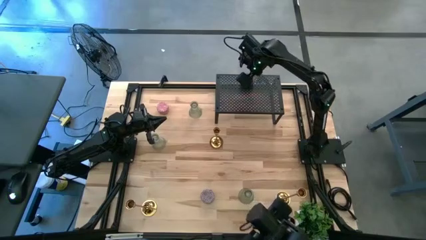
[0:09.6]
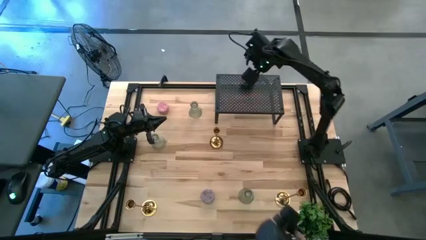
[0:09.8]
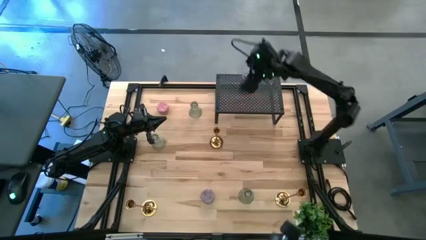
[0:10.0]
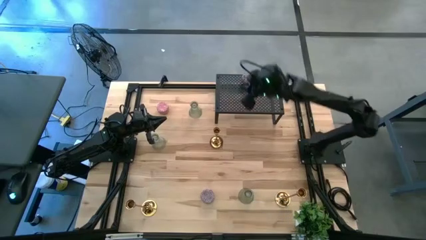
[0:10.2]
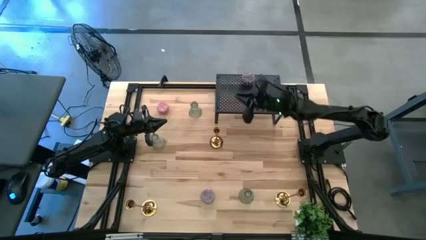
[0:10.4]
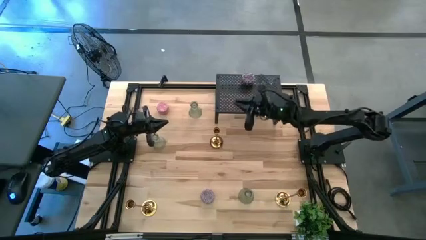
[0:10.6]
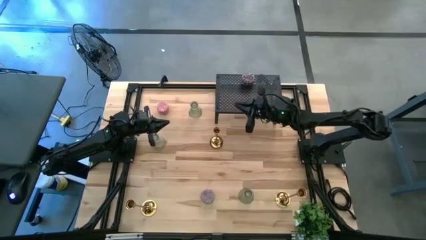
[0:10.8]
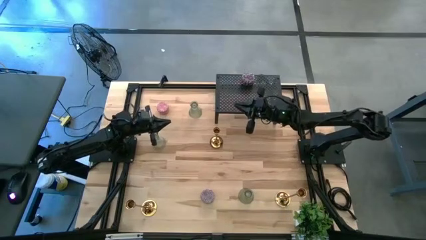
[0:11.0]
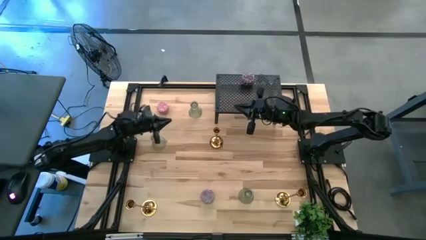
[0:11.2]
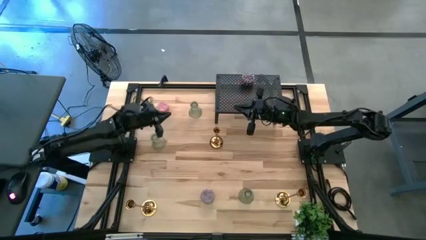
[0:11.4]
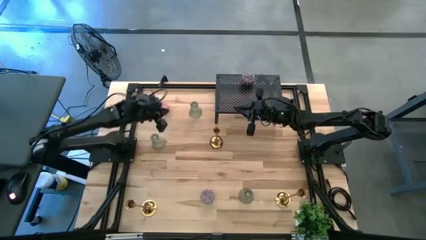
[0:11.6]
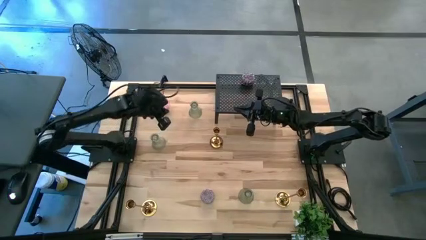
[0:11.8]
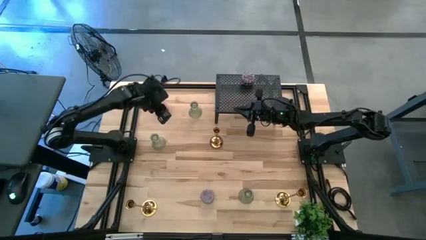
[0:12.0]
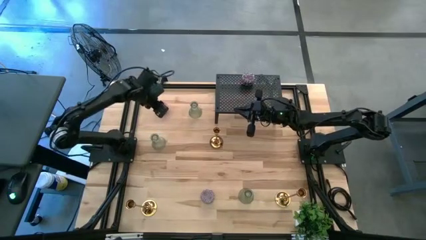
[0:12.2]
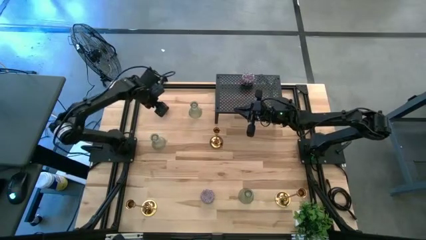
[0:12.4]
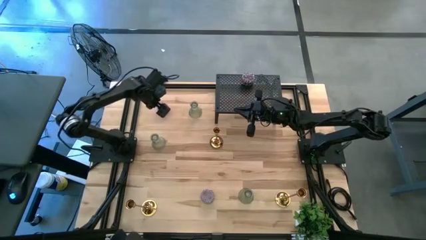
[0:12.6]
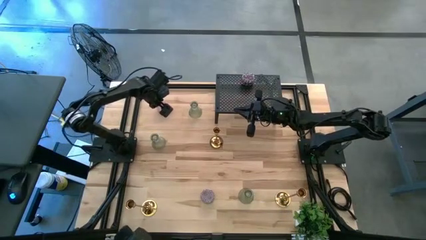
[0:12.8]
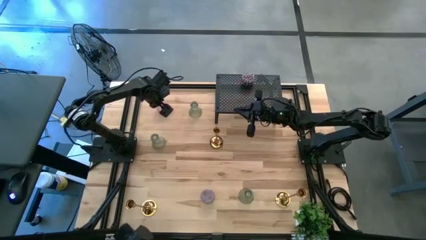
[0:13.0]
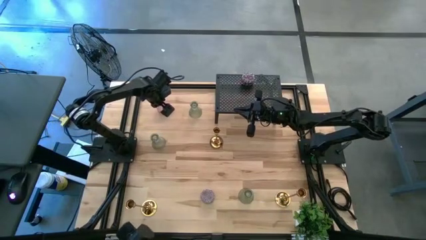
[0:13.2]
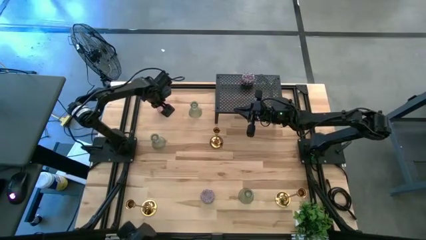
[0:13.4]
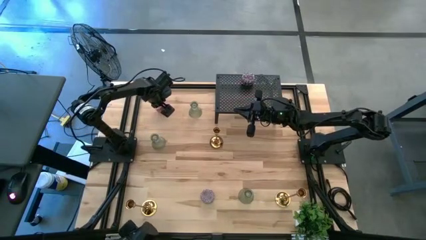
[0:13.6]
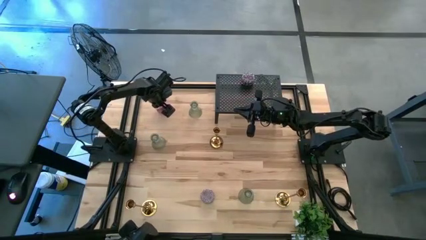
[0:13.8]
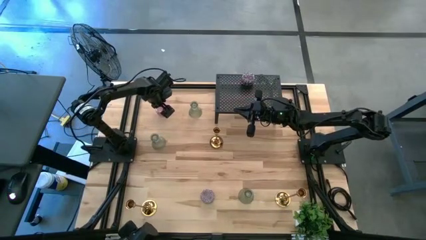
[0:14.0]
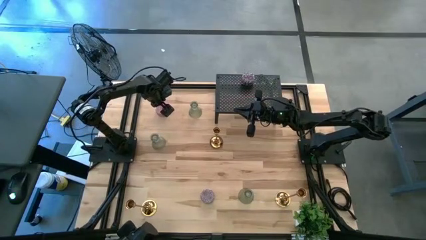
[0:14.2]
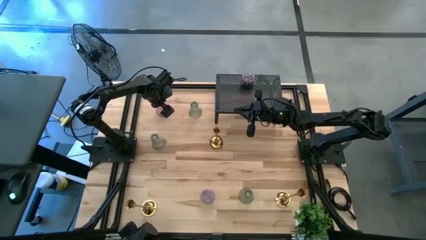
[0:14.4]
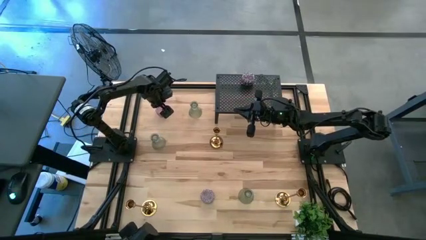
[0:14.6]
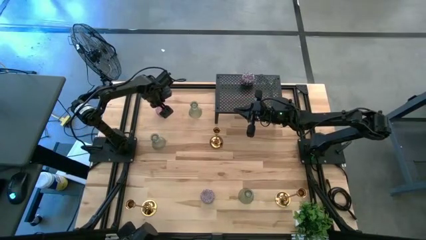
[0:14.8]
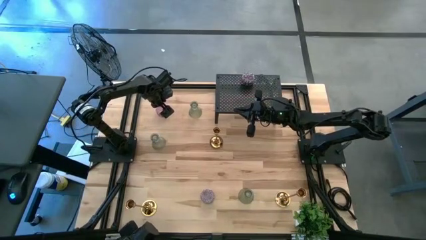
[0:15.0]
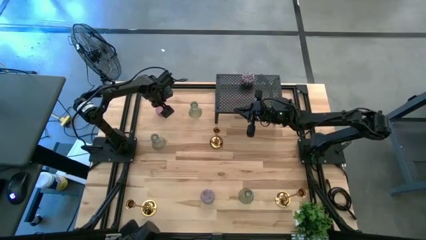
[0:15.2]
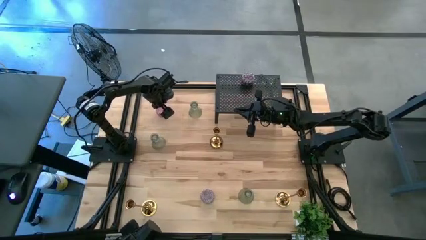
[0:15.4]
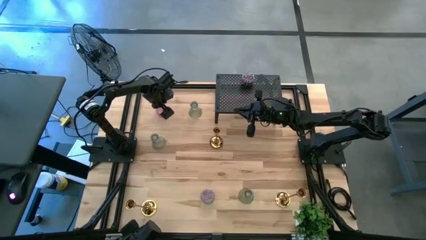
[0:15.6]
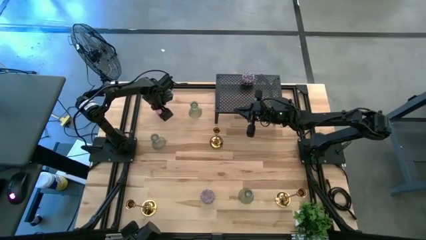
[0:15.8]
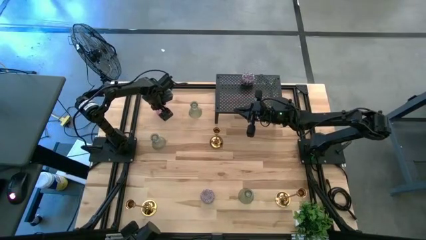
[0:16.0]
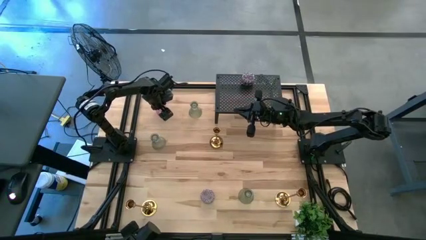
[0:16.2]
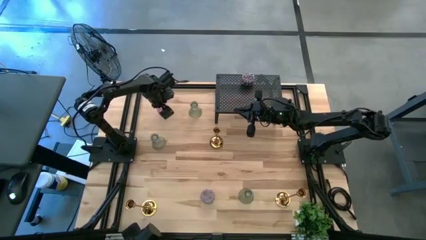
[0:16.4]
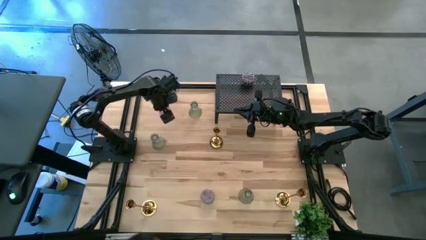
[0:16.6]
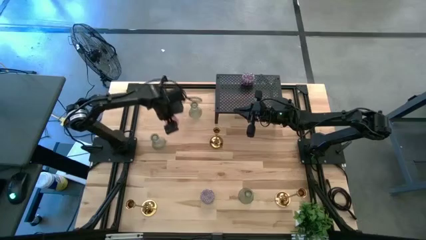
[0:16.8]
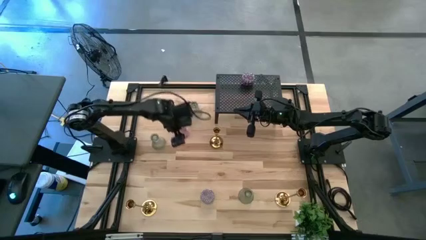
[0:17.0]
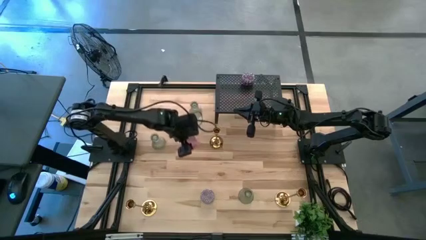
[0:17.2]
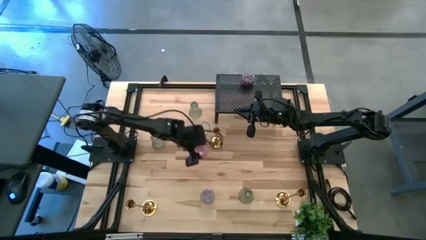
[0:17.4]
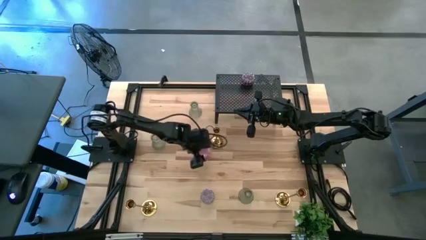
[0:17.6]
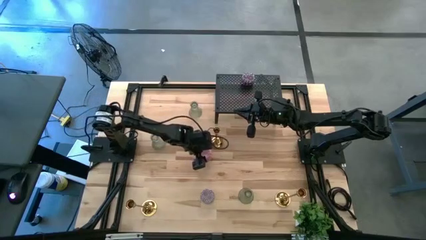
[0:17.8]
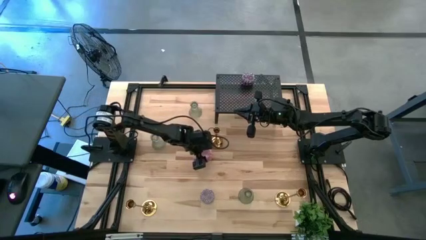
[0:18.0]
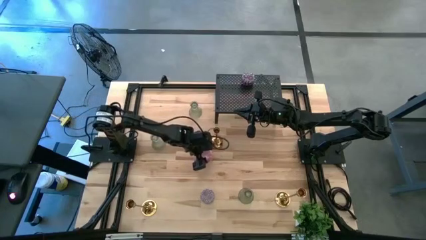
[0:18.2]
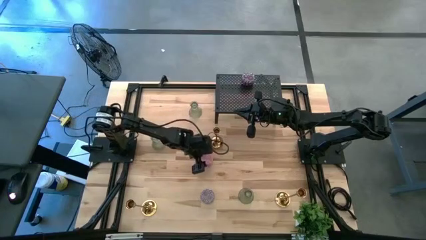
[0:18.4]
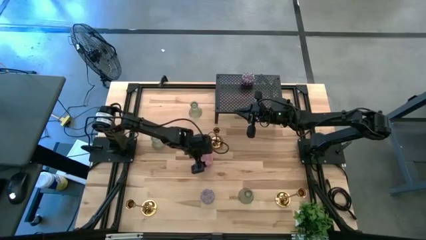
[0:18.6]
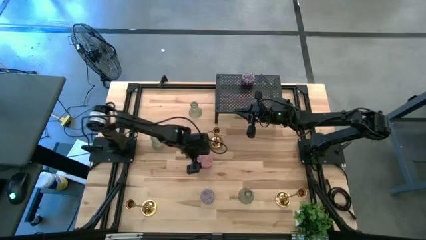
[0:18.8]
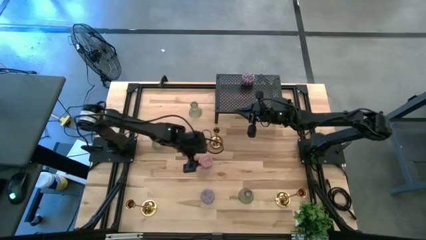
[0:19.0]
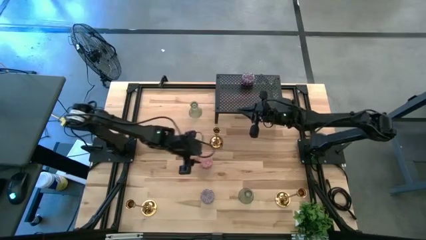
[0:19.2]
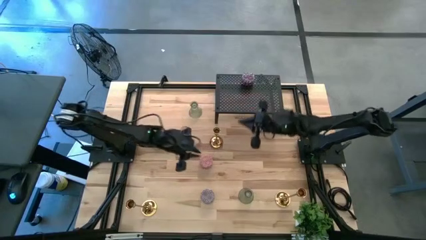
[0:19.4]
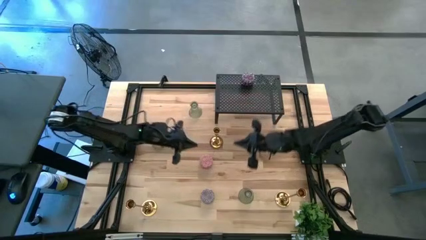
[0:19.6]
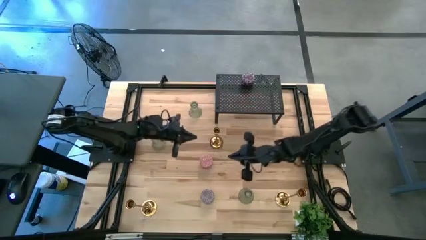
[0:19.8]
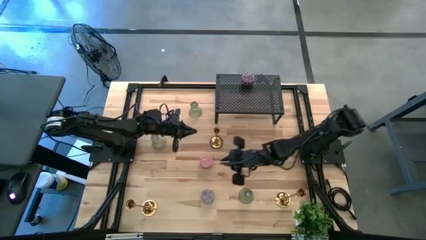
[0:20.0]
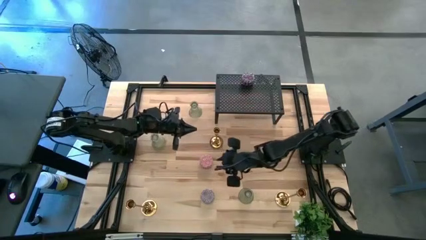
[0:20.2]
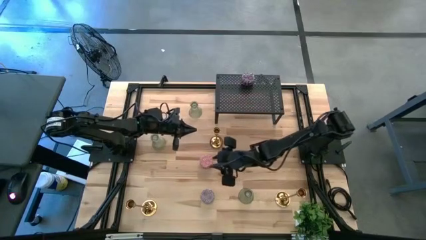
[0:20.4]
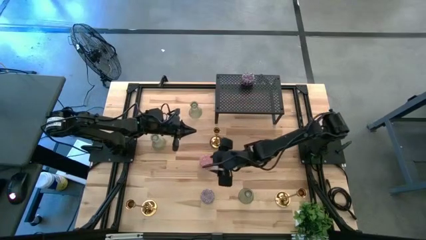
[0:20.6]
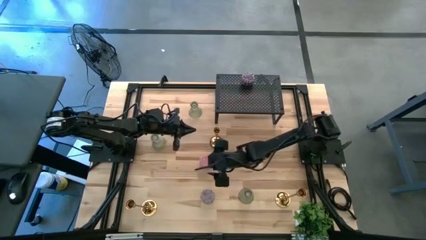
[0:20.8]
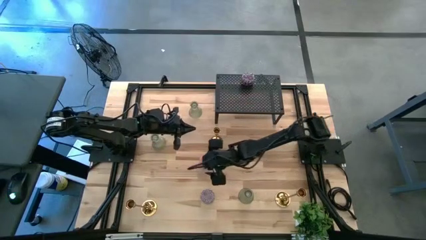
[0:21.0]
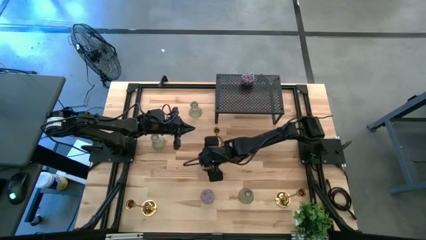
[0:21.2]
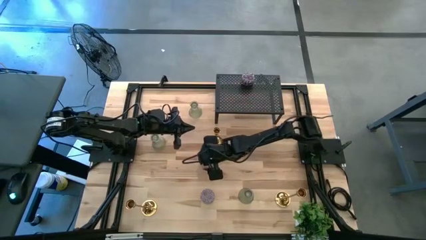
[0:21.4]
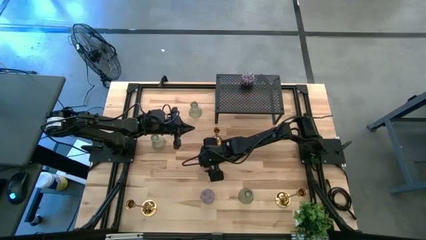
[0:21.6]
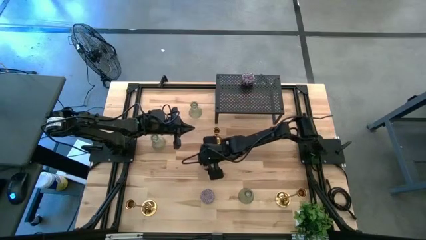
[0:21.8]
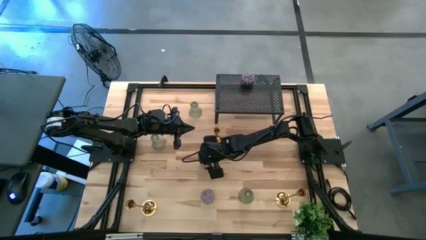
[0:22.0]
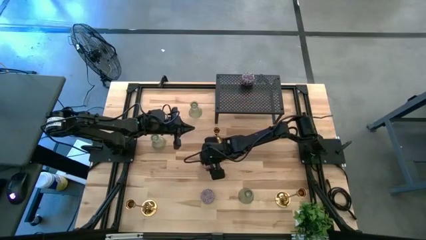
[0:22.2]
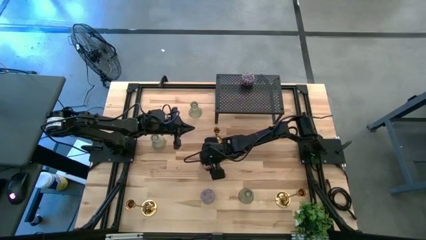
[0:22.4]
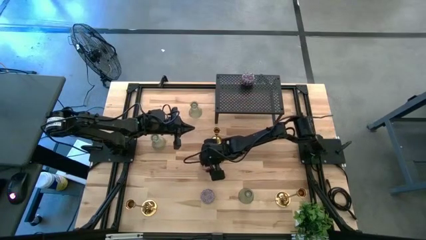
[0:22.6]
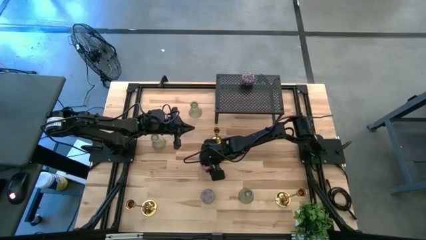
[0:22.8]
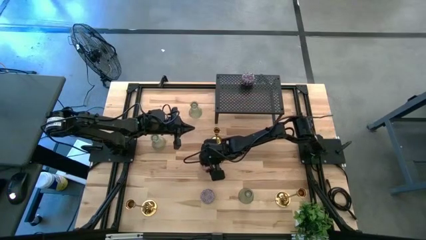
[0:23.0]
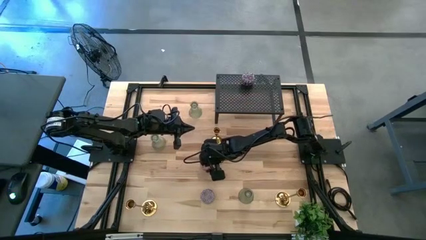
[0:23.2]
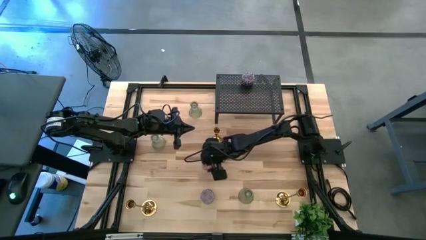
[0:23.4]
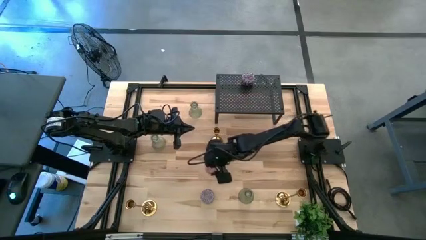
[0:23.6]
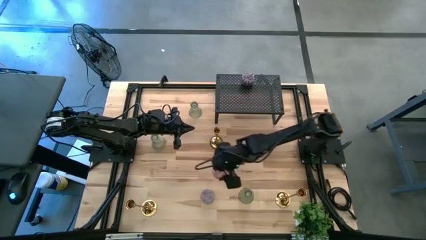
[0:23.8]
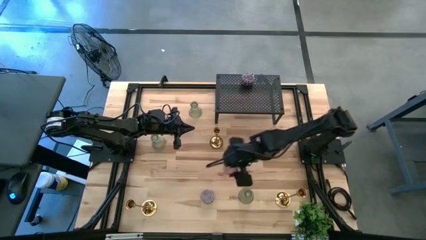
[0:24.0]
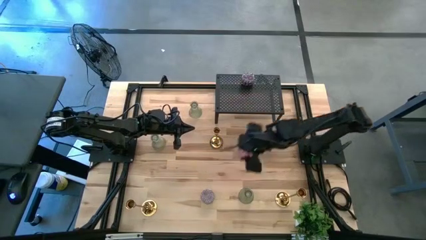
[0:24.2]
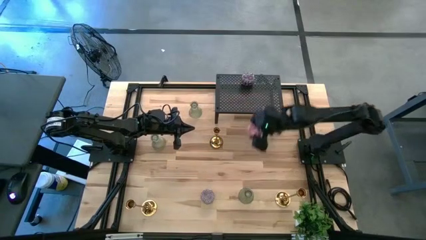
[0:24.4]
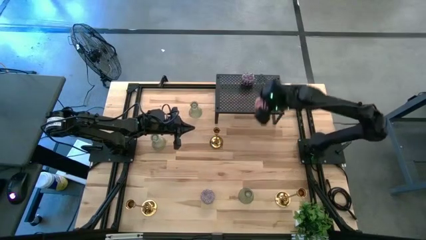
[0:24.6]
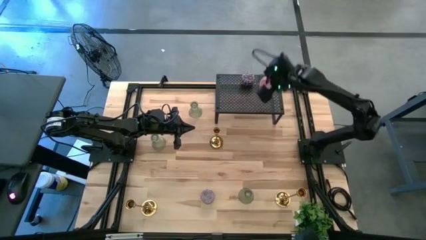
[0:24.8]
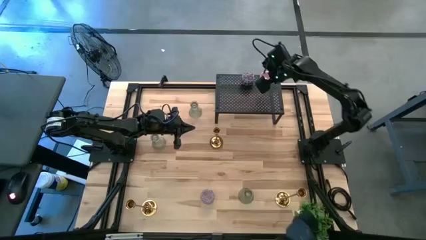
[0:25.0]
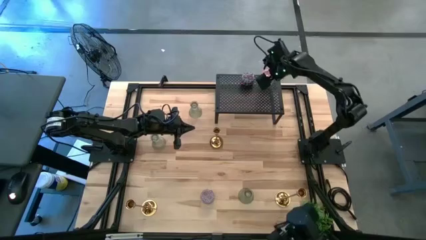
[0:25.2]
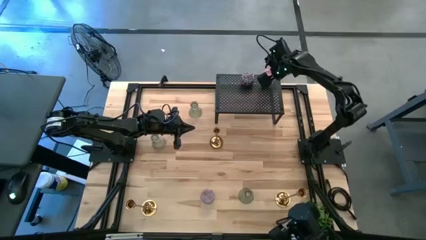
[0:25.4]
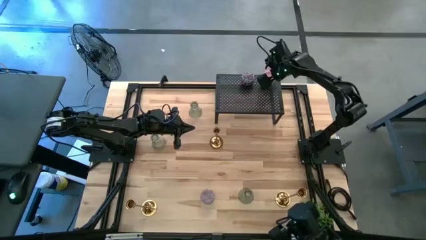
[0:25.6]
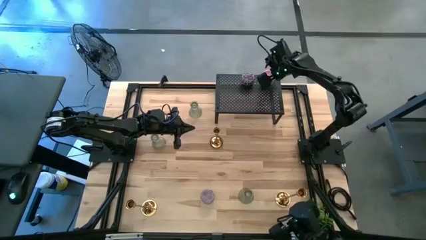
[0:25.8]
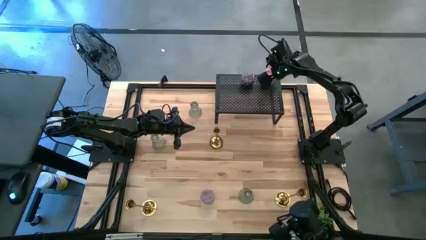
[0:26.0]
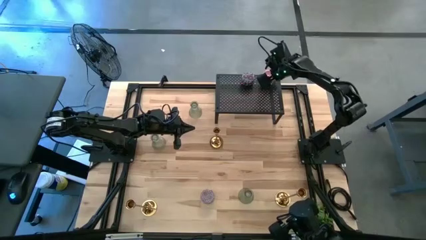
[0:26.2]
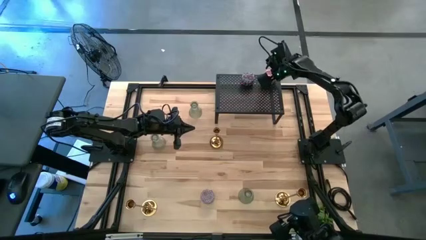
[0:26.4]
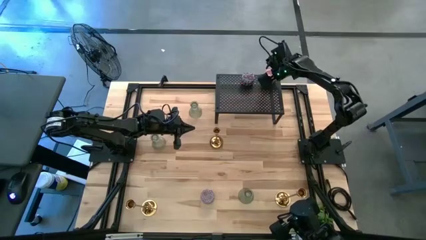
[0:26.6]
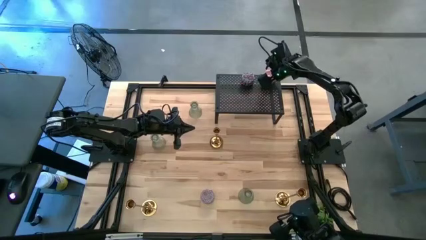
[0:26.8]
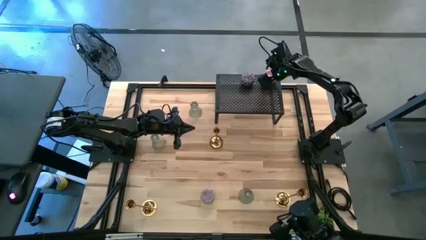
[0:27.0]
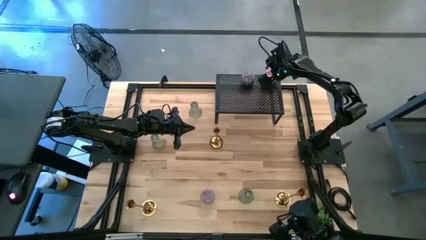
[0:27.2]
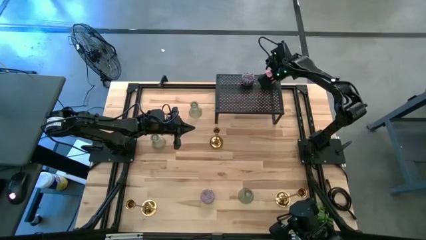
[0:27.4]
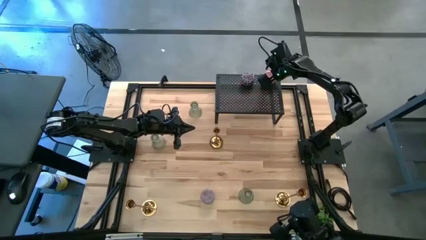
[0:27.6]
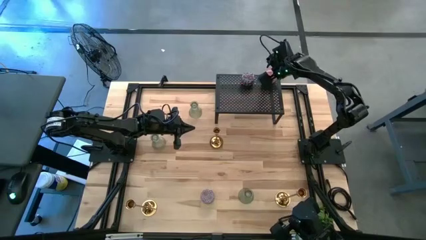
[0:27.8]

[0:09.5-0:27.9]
Task: Pick & Place candle stick holders
Put the pink patterned candle on the shelf
